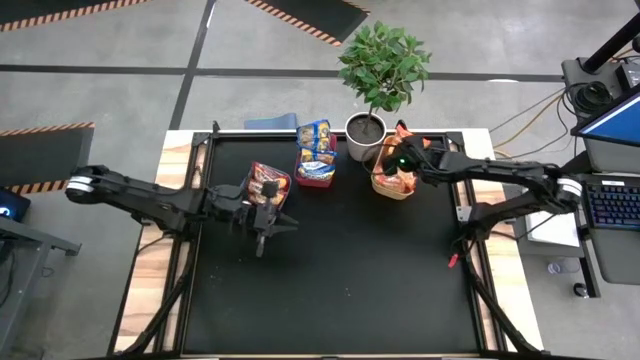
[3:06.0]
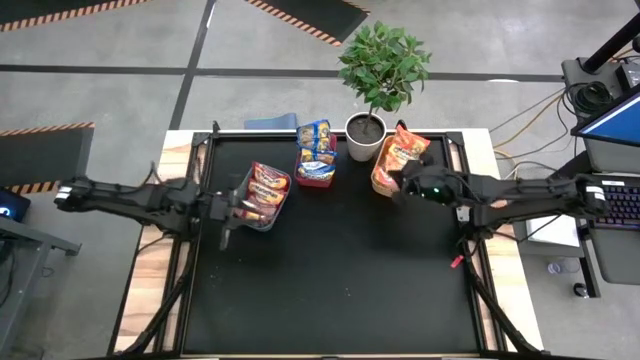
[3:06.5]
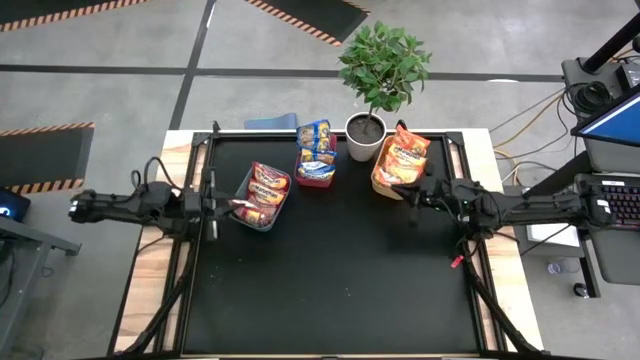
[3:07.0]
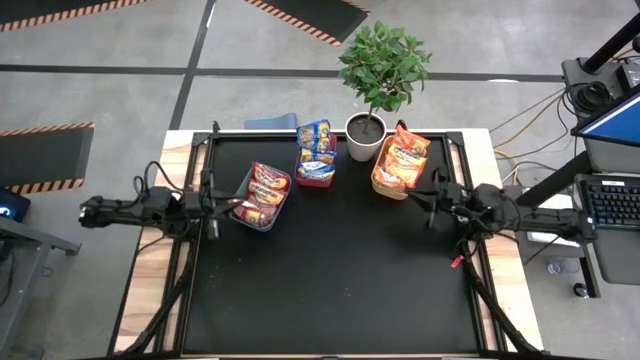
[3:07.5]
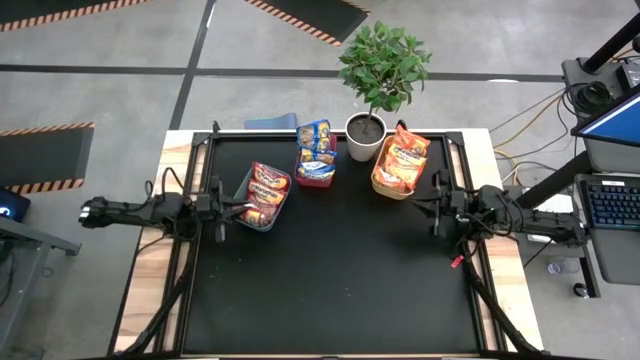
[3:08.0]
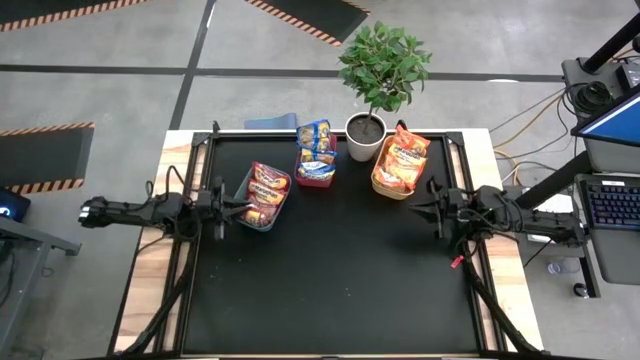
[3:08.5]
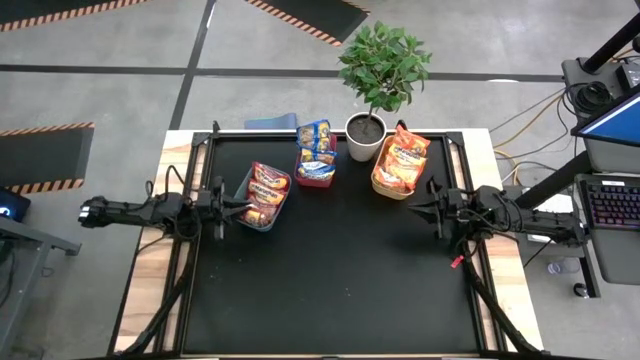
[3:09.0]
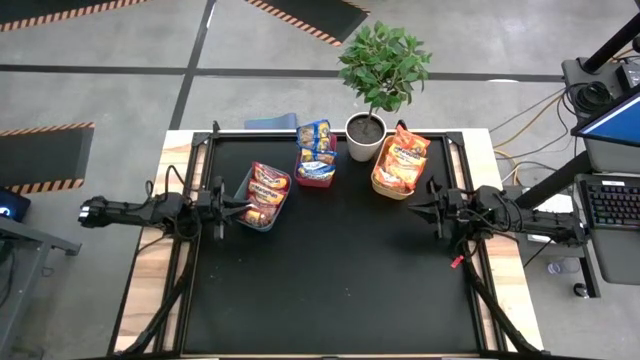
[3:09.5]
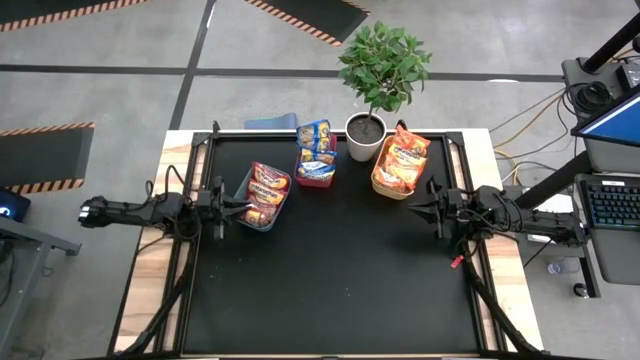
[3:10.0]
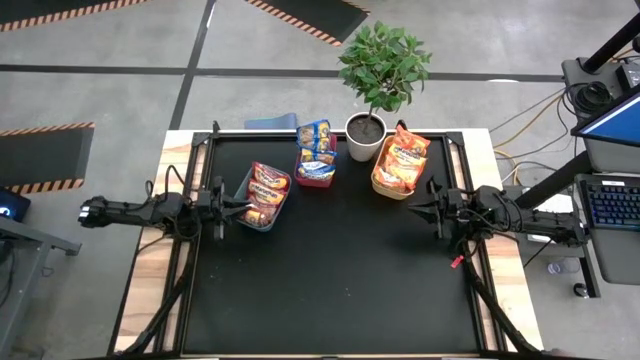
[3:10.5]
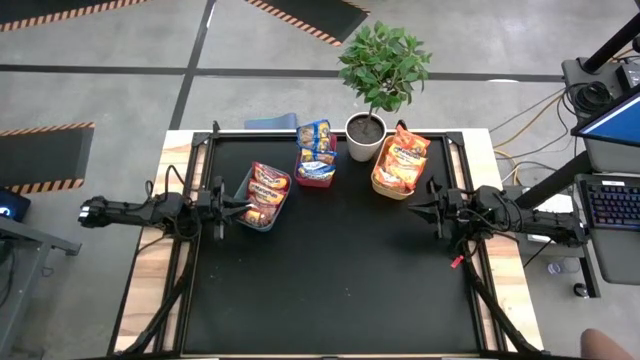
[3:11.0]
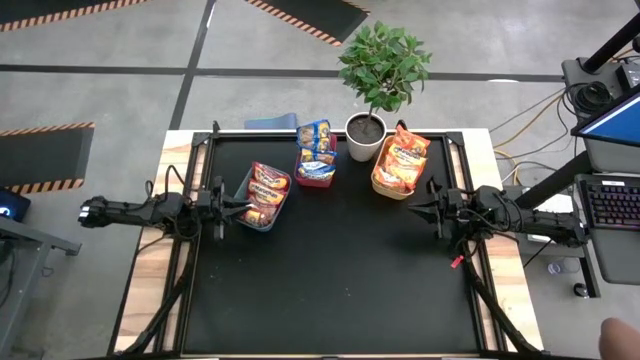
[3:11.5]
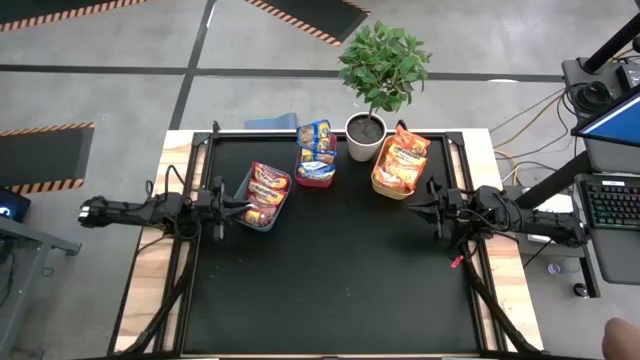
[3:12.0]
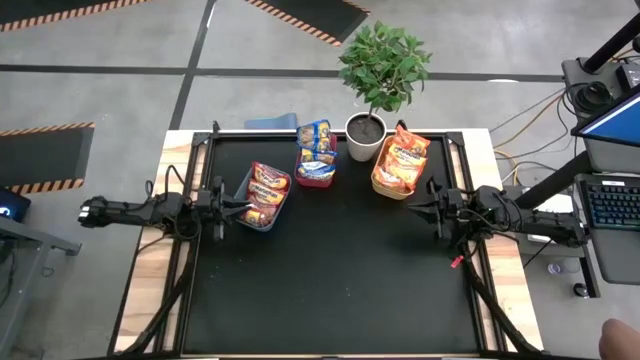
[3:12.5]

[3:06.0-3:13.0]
Task: Sort Maruchan noodles
Return to Home Position

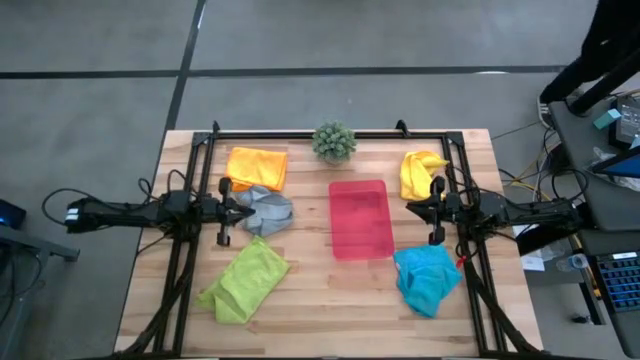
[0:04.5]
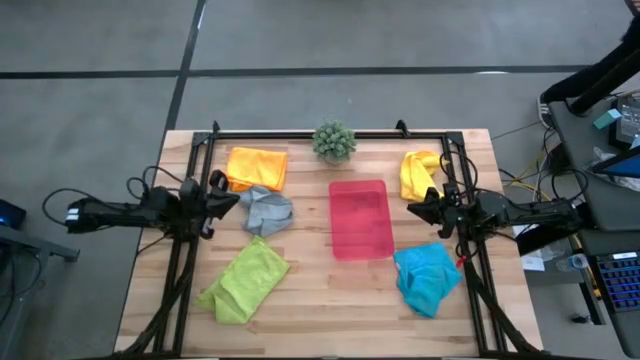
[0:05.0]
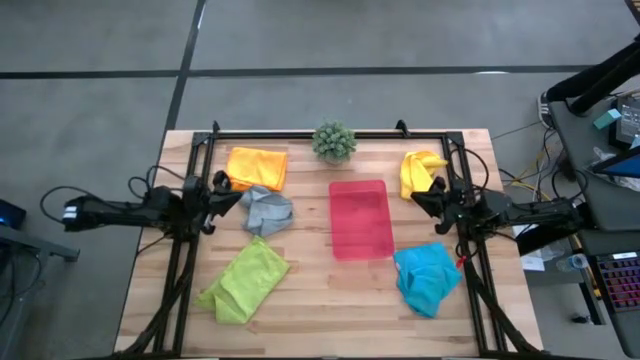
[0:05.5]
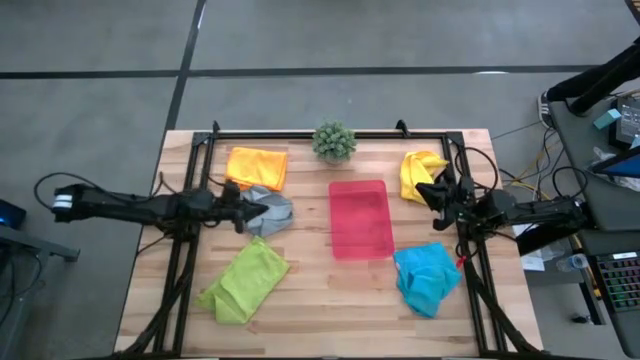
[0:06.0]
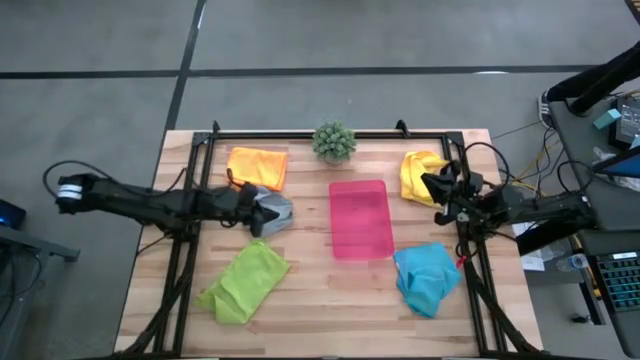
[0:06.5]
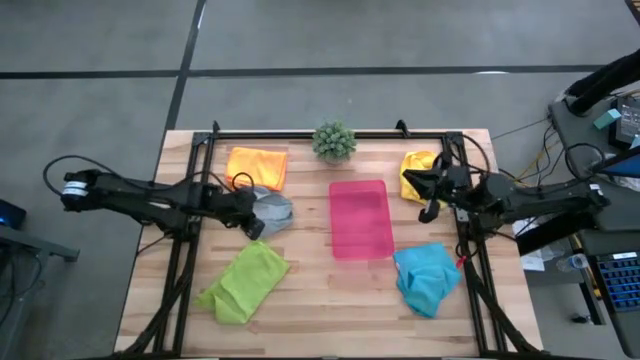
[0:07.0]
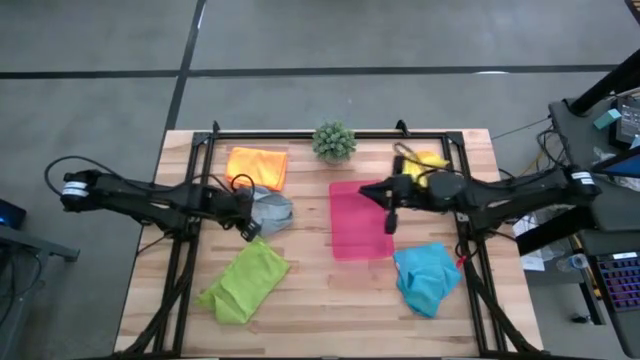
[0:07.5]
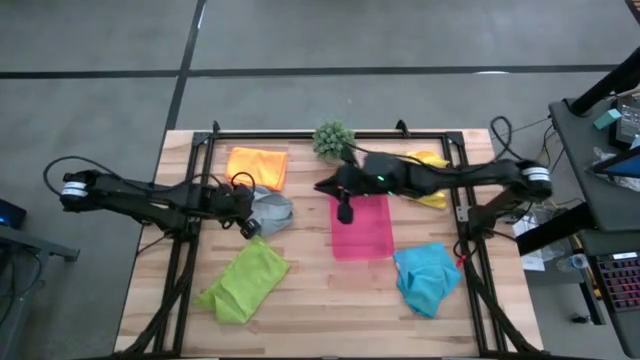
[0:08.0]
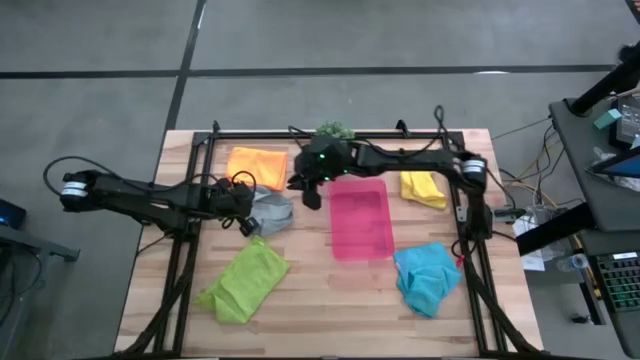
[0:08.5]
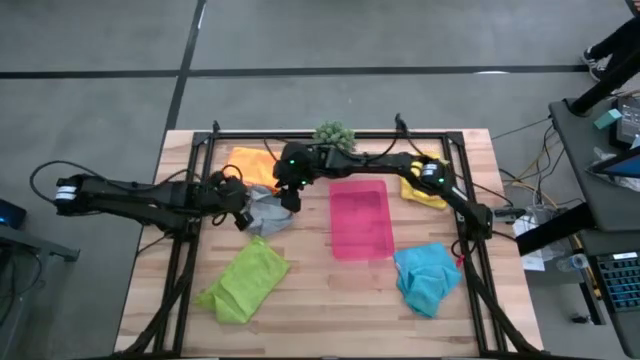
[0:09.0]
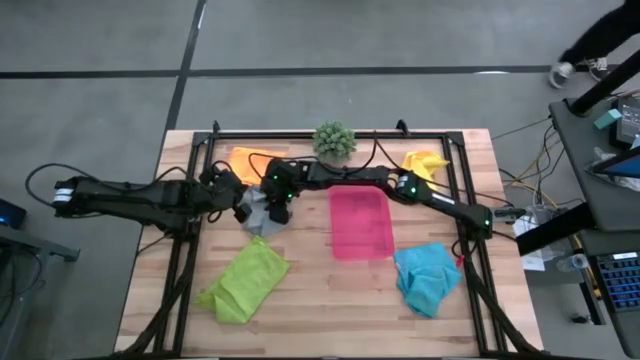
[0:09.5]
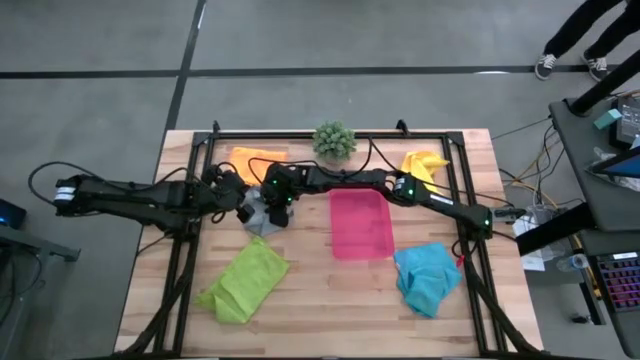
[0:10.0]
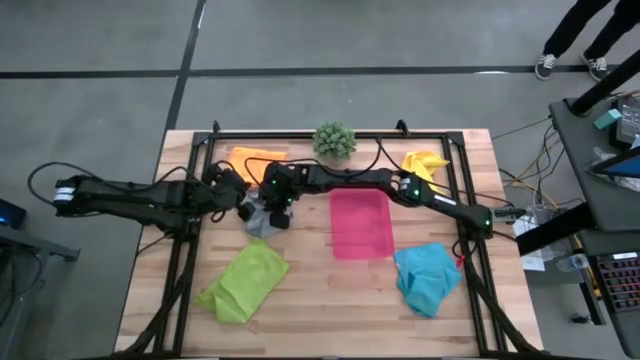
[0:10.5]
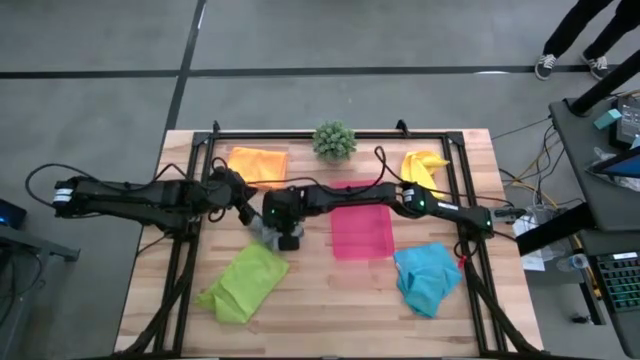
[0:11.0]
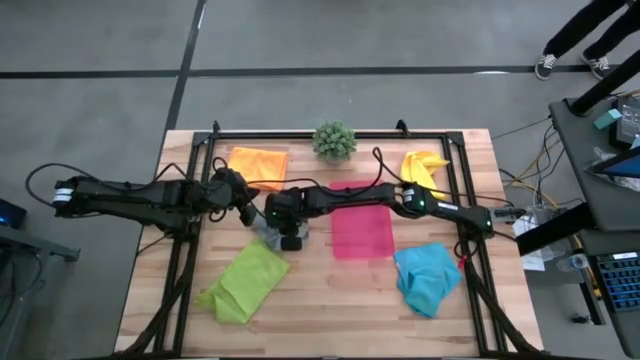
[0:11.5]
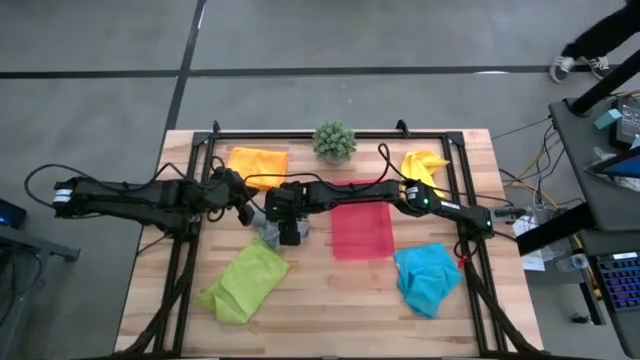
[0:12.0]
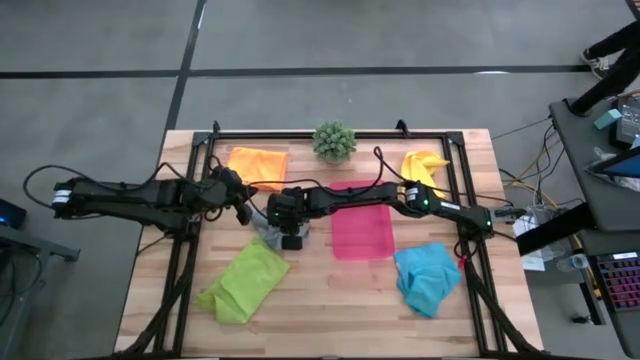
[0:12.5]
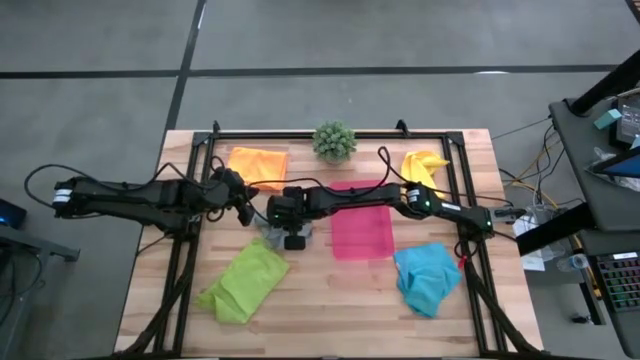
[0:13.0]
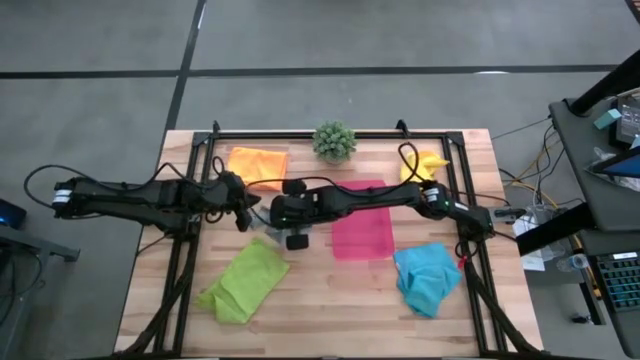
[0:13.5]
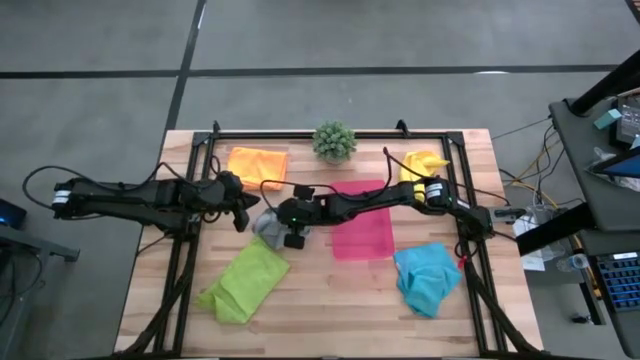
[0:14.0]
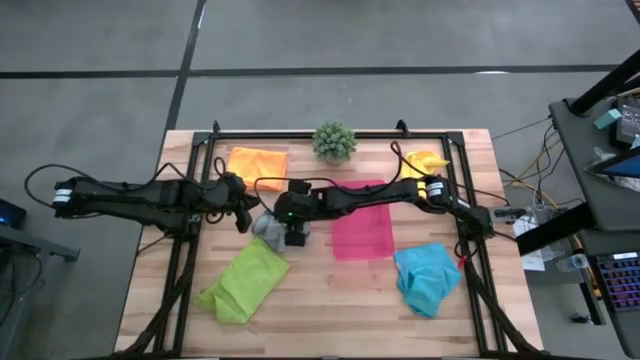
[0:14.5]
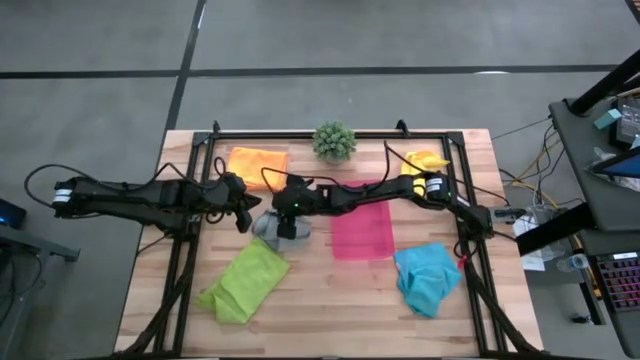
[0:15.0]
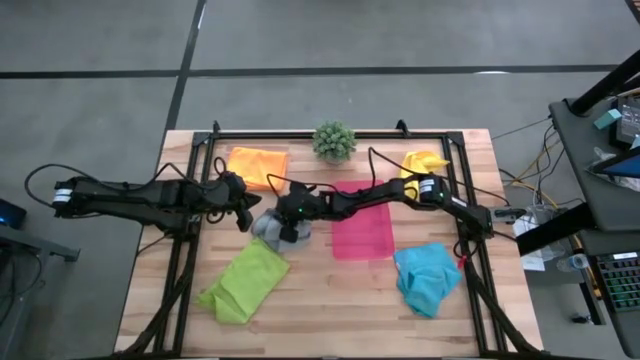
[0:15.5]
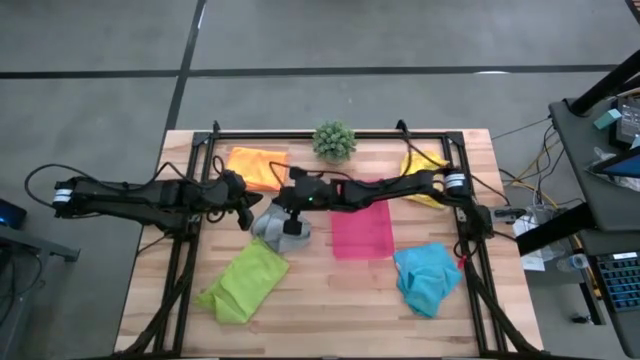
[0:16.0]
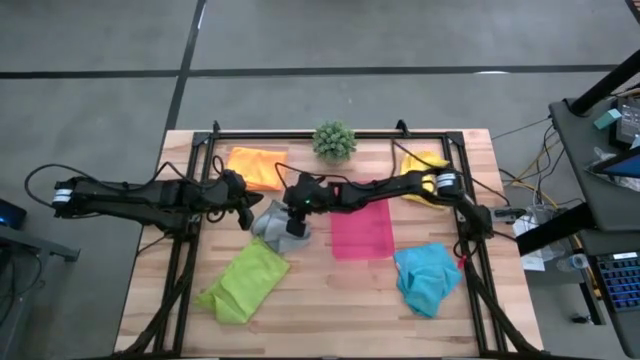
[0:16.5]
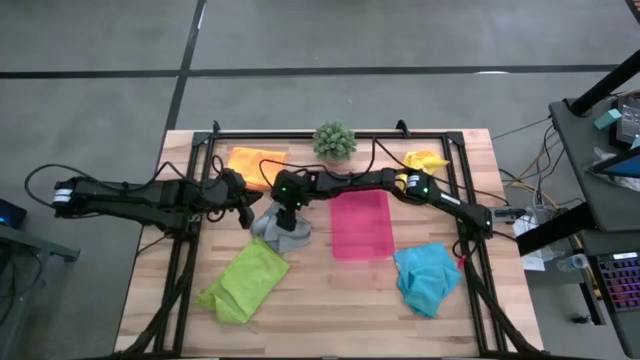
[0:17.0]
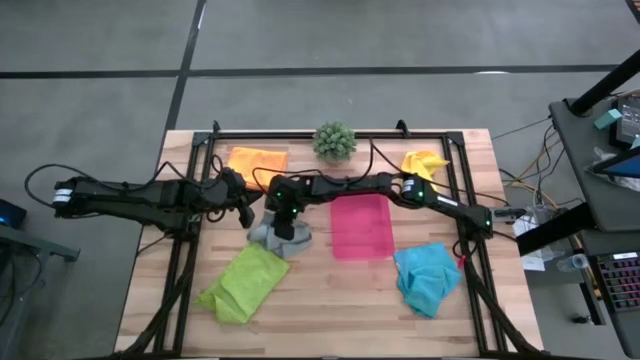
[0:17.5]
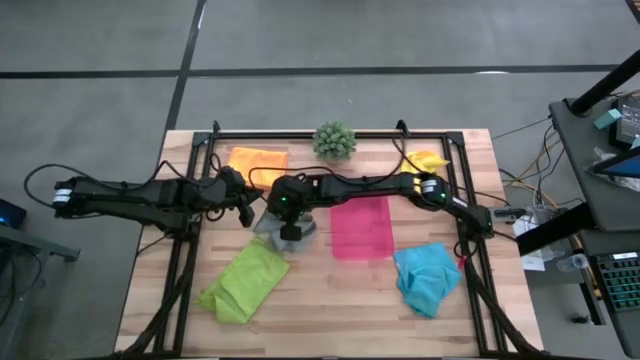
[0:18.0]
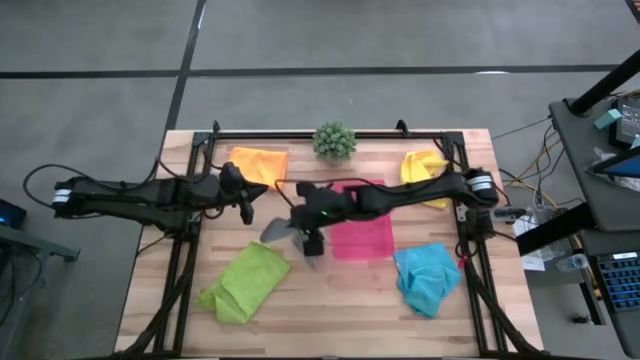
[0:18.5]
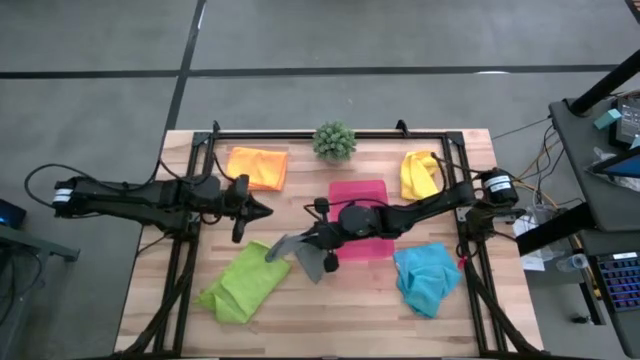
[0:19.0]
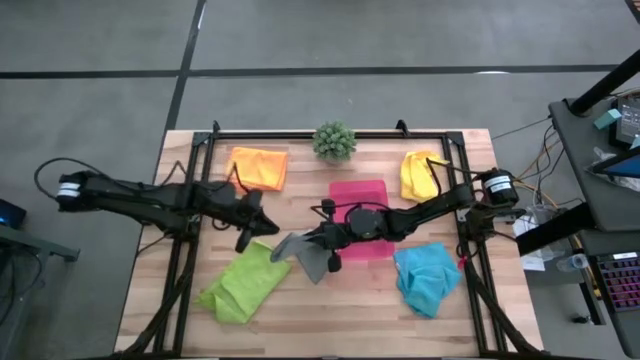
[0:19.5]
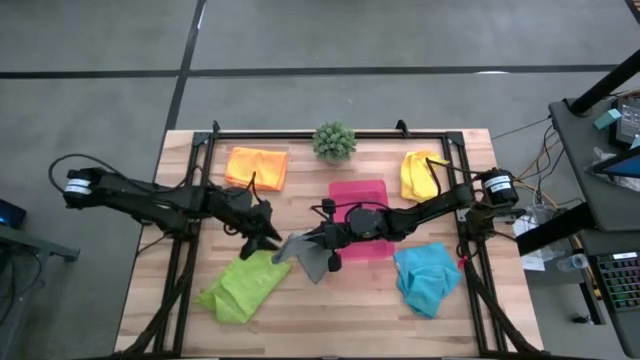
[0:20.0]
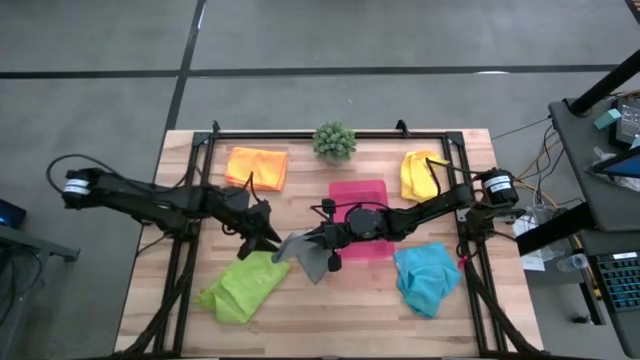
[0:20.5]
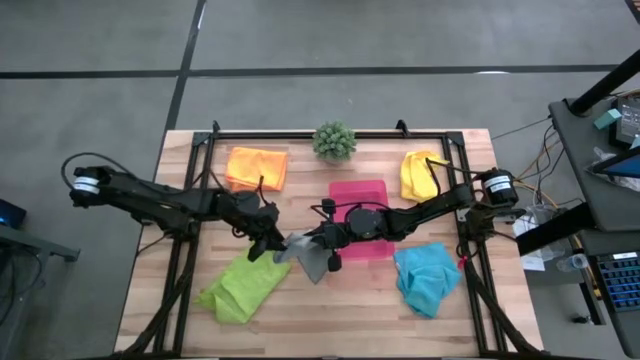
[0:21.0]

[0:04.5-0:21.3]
Task: Fold microfiber towels
Fold the gray towel
